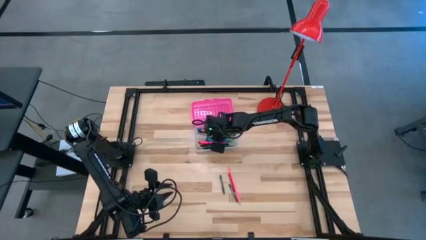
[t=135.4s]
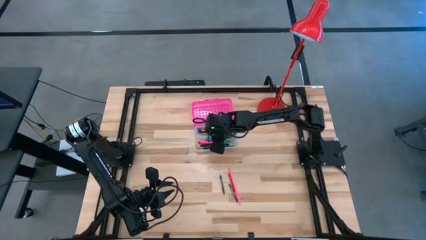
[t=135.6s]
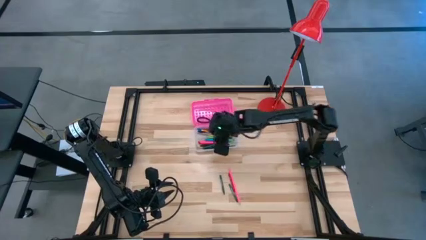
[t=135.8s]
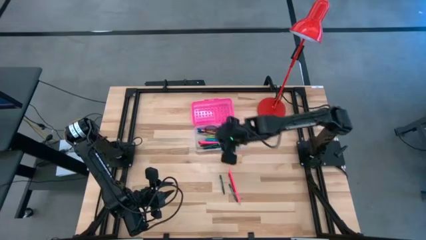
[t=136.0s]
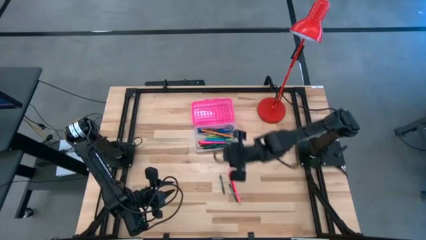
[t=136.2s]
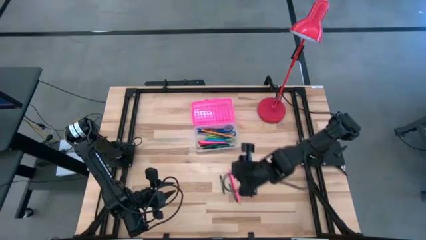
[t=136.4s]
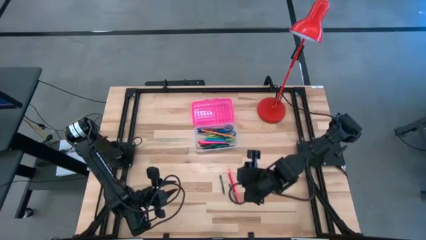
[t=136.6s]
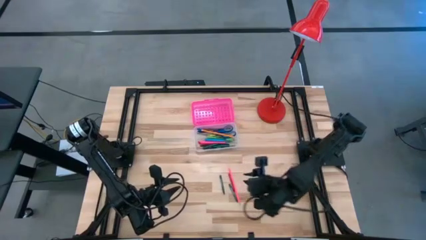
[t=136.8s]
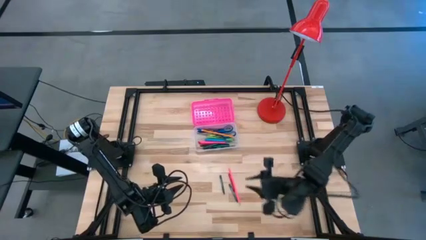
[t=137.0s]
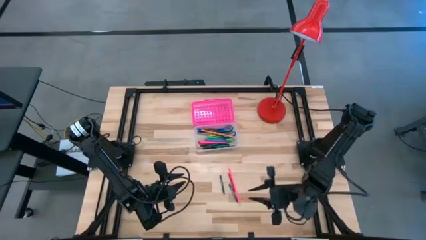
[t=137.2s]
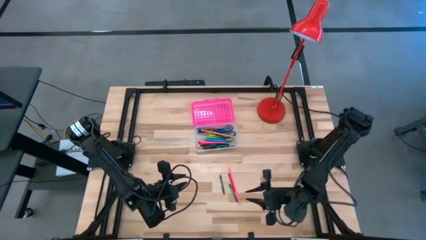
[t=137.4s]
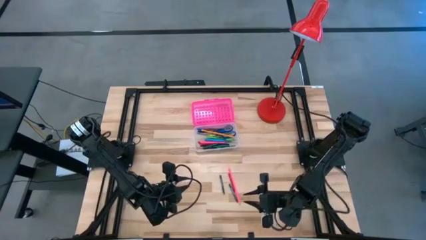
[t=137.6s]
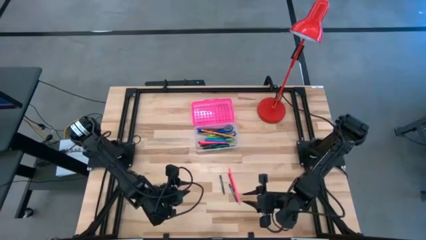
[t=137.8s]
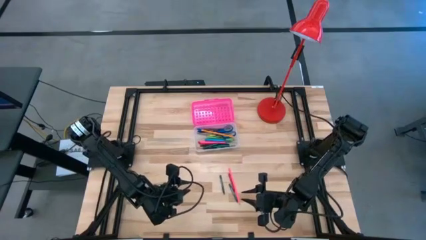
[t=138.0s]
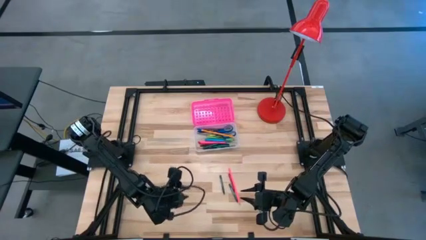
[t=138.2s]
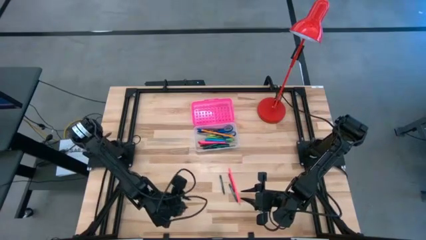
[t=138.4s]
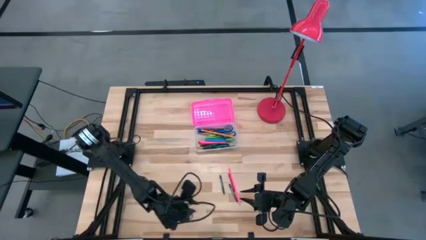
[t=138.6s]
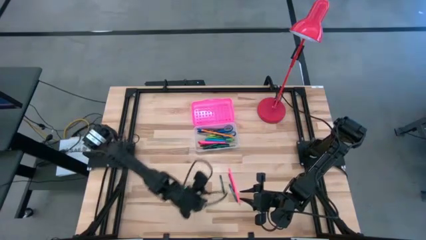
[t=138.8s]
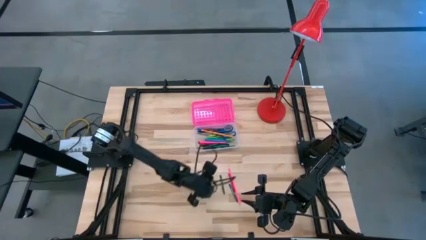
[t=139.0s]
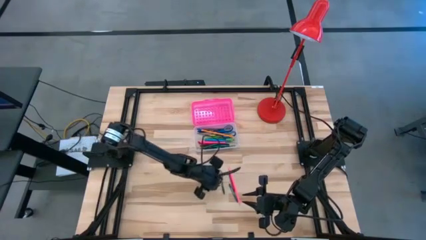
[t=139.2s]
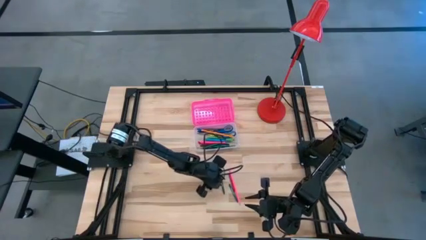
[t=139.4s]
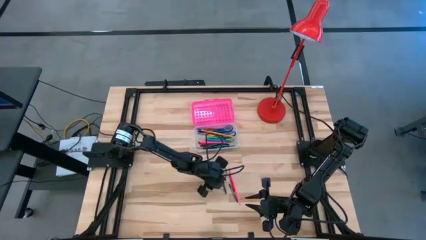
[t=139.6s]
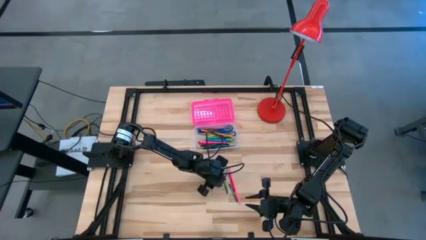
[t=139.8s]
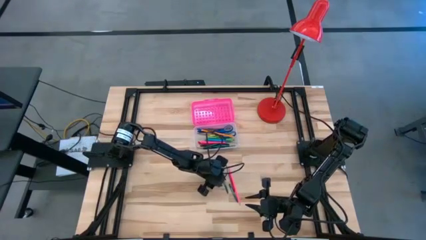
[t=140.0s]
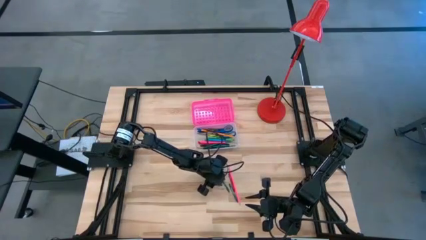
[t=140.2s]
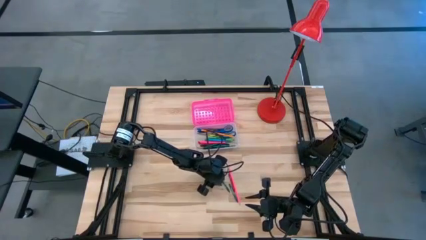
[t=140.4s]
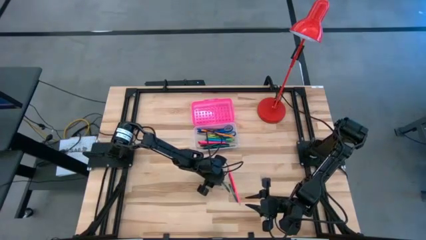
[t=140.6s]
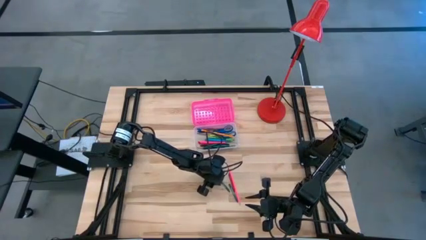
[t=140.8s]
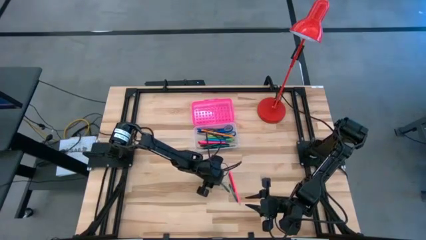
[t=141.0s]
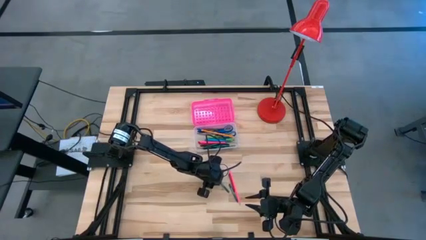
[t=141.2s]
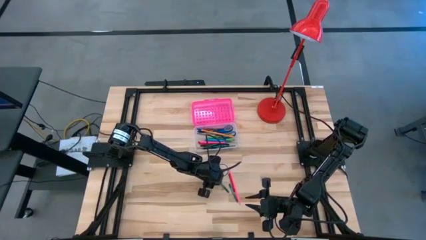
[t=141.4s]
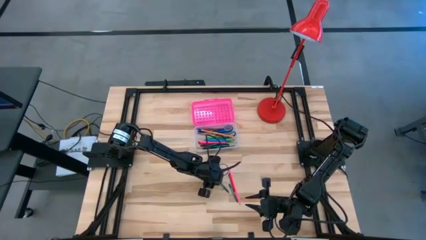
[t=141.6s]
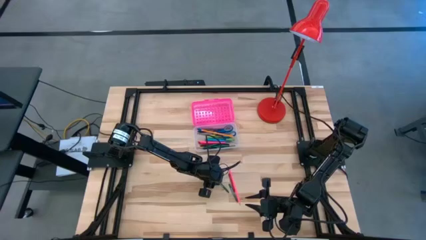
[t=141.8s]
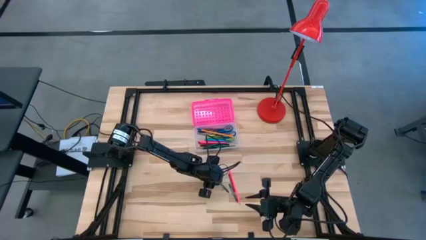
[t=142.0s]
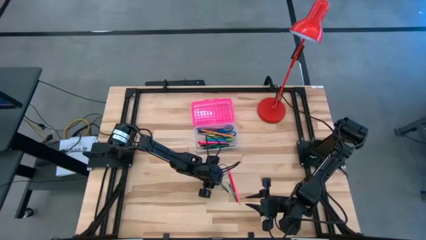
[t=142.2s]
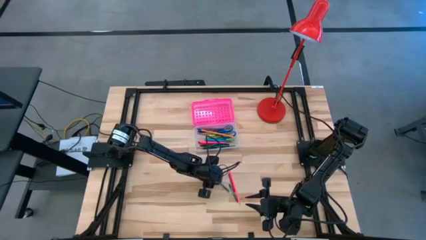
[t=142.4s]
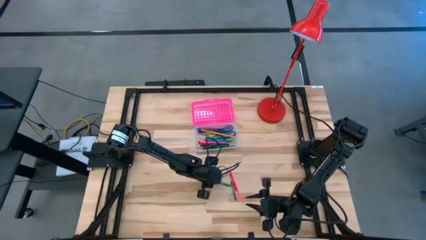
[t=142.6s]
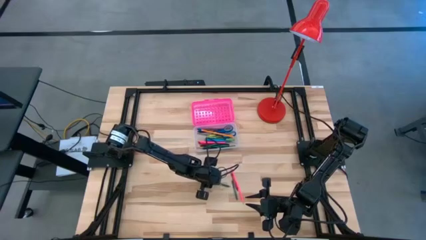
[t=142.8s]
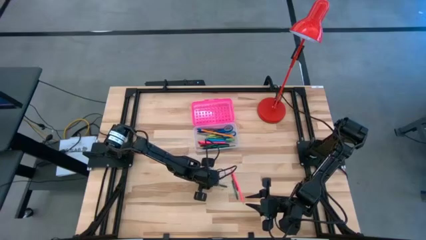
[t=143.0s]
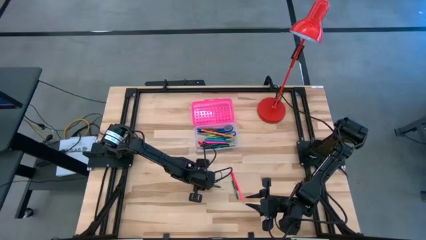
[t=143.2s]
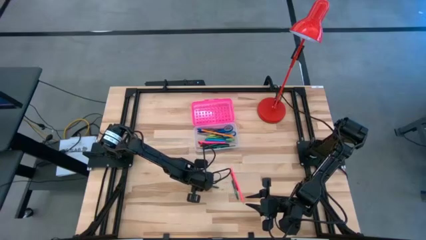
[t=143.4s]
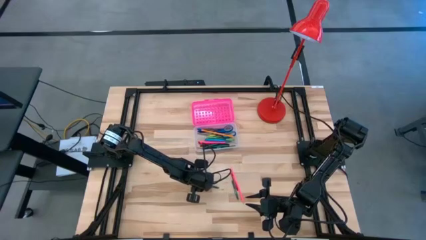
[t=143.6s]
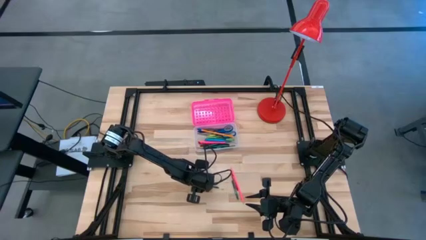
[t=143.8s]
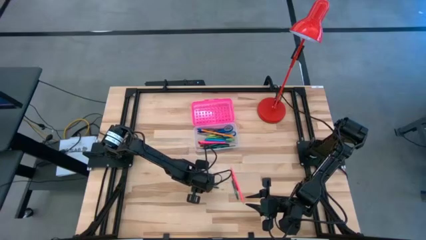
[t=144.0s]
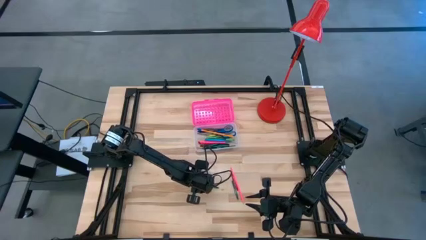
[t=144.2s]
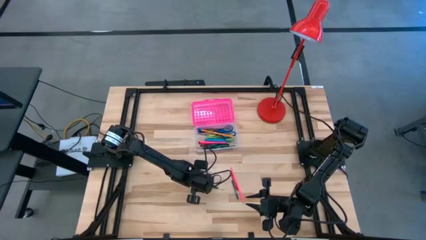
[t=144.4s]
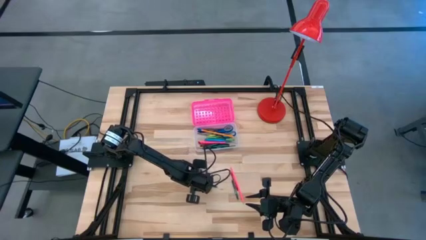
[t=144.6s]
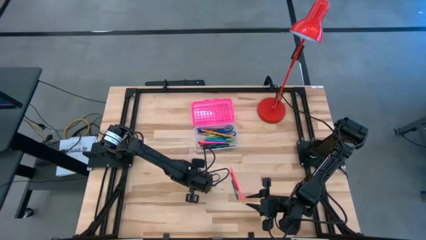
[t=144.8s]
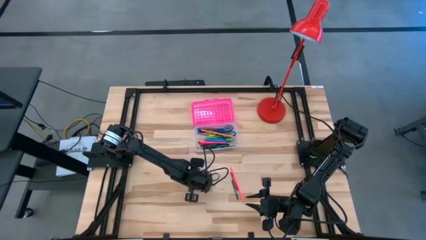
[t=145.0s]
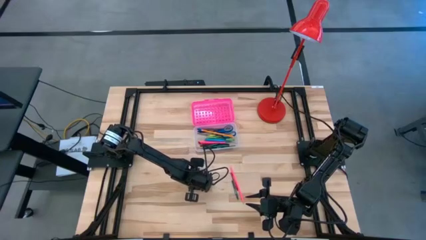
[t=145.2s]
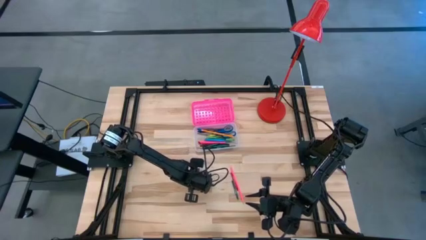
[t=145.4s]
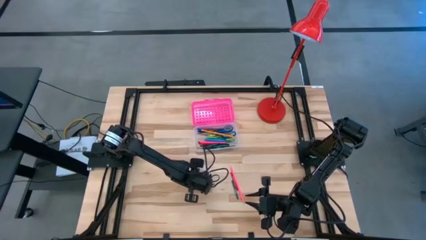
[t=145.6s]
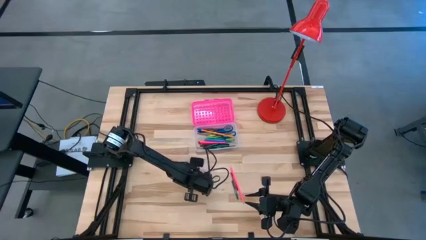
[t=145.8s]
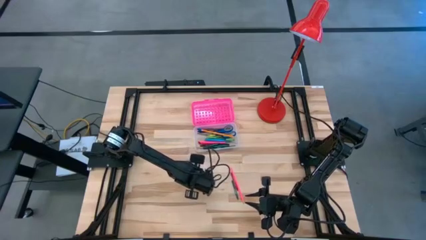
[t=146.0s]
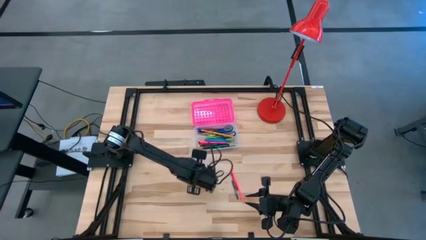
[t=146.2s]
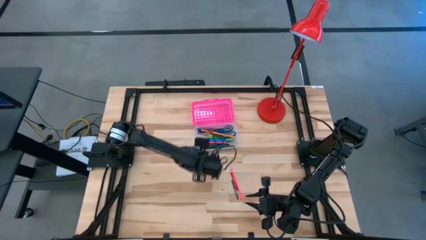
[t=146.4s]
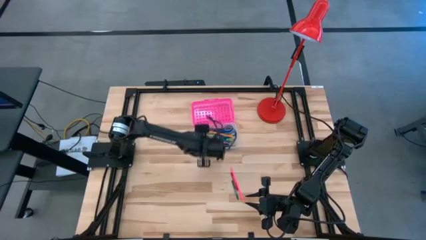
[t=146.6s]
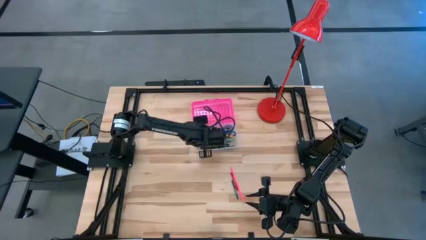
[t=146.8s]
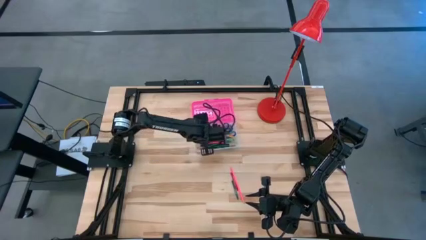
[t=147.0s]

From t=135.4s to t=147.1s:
Task: Pick & place school supplies into a supply box
Put the green crayon into the pink supply box
